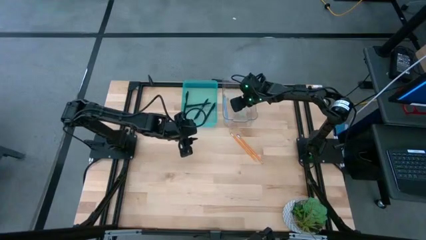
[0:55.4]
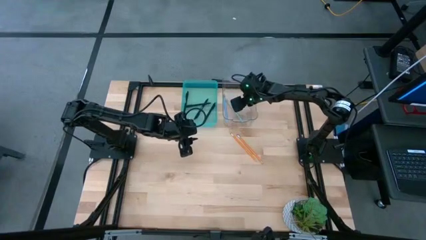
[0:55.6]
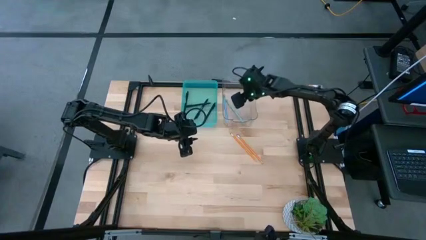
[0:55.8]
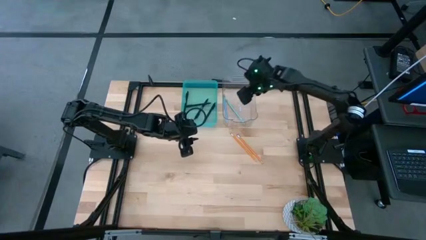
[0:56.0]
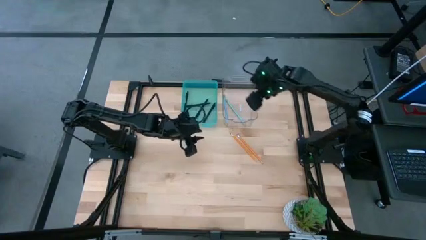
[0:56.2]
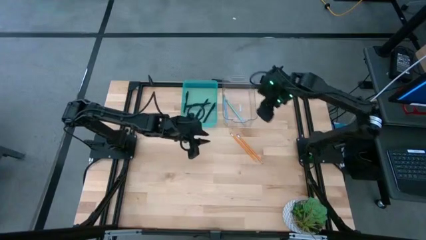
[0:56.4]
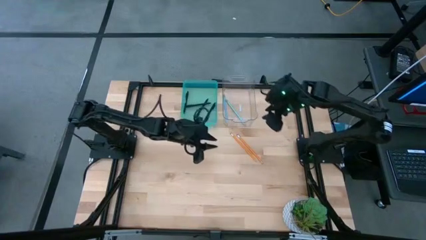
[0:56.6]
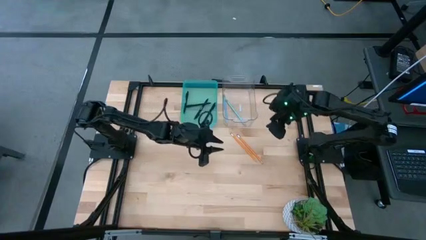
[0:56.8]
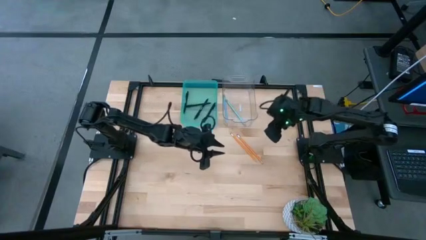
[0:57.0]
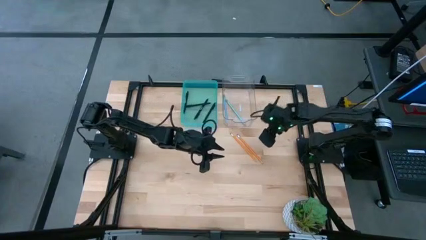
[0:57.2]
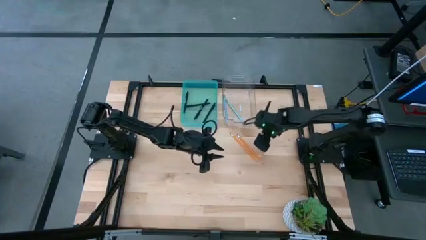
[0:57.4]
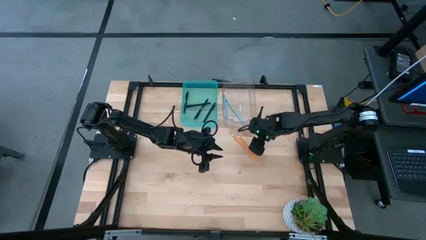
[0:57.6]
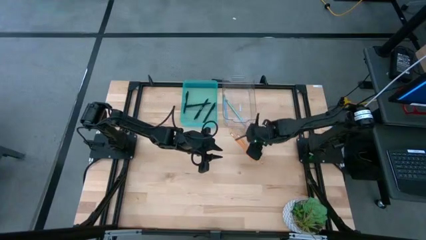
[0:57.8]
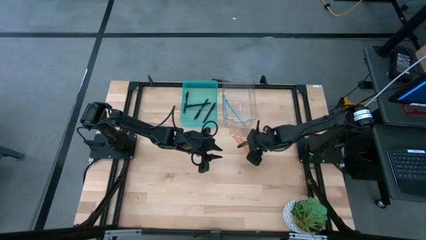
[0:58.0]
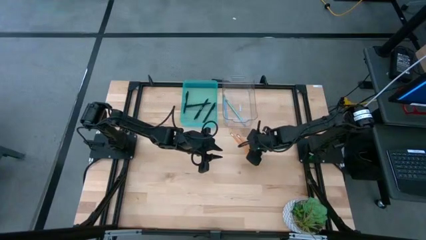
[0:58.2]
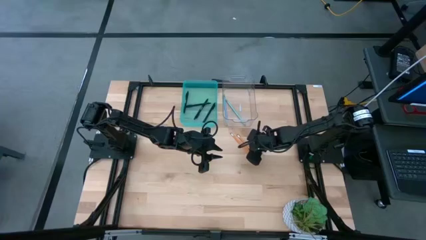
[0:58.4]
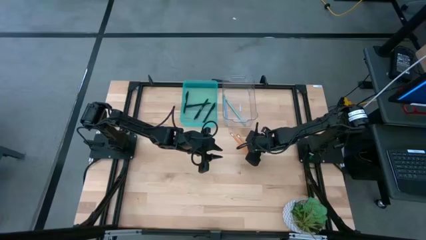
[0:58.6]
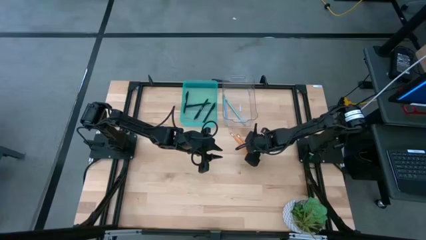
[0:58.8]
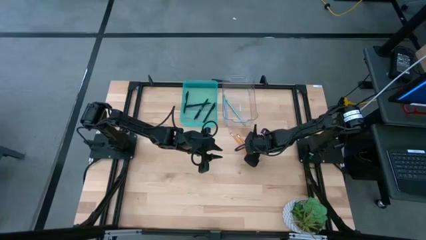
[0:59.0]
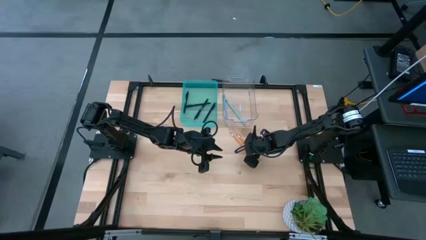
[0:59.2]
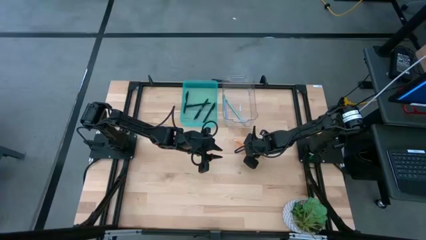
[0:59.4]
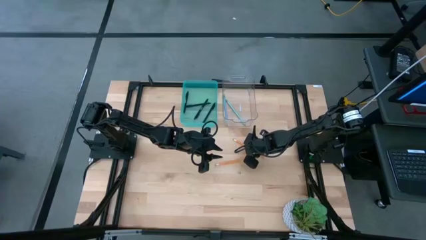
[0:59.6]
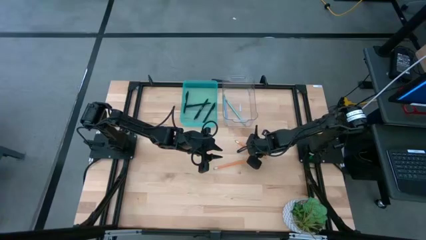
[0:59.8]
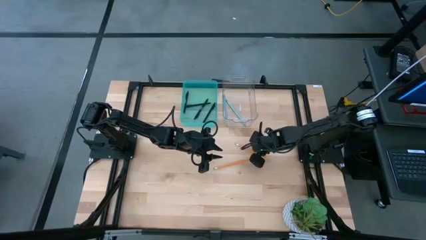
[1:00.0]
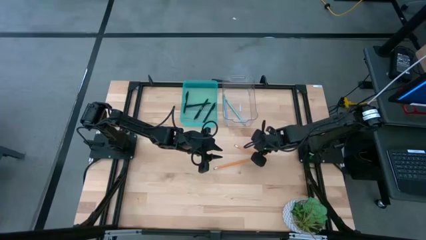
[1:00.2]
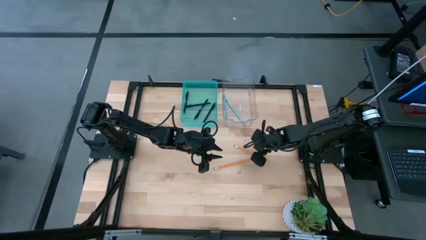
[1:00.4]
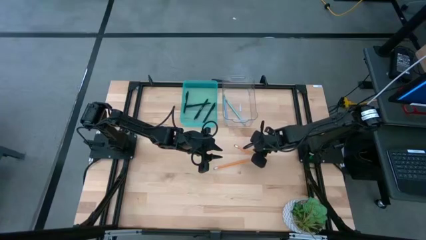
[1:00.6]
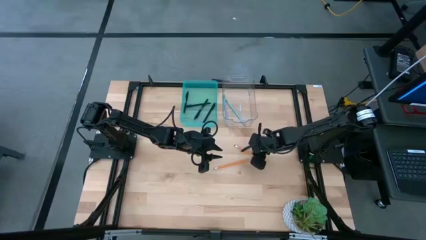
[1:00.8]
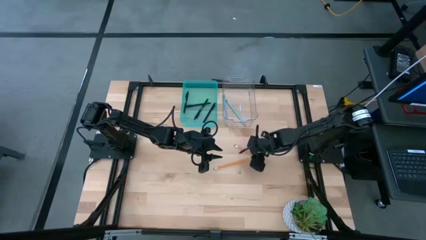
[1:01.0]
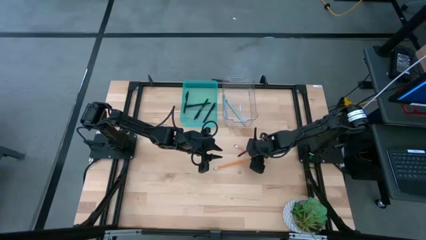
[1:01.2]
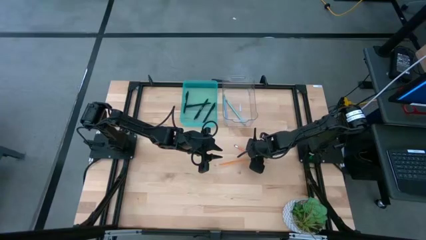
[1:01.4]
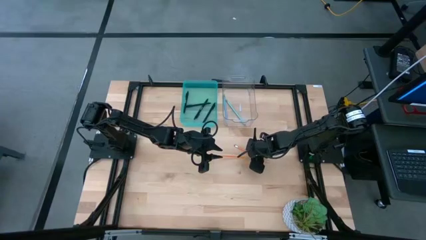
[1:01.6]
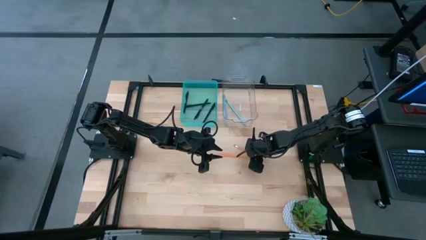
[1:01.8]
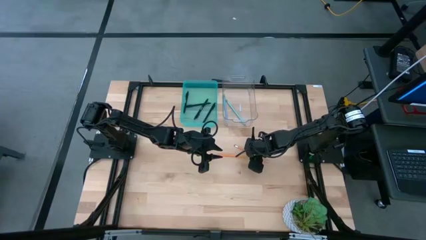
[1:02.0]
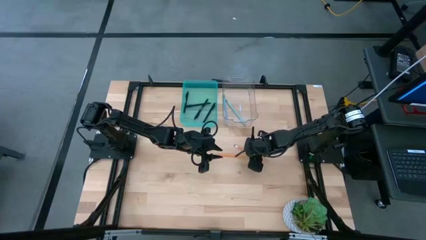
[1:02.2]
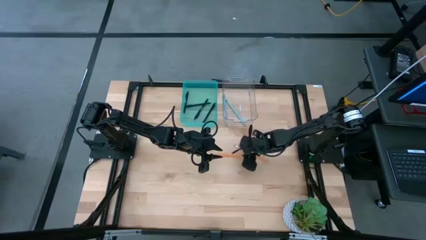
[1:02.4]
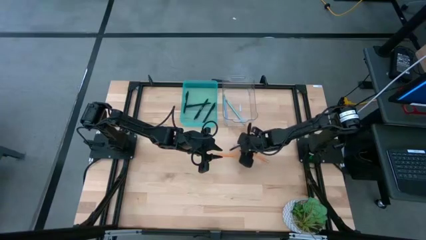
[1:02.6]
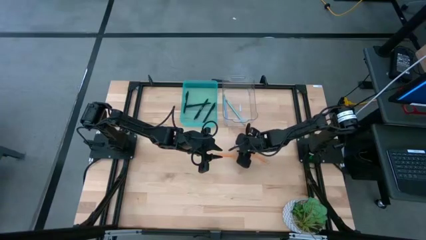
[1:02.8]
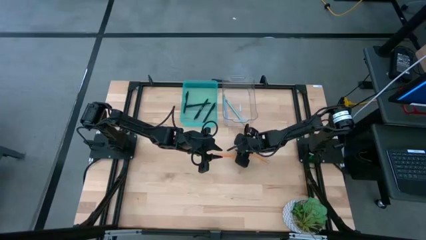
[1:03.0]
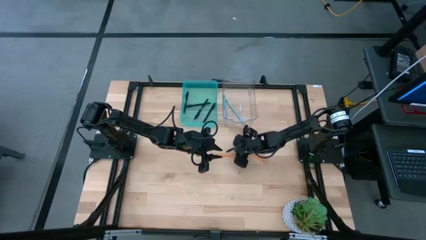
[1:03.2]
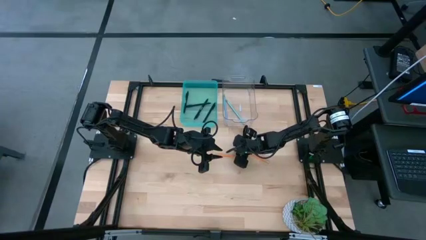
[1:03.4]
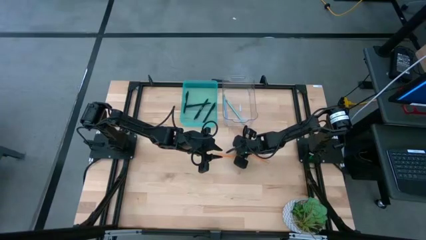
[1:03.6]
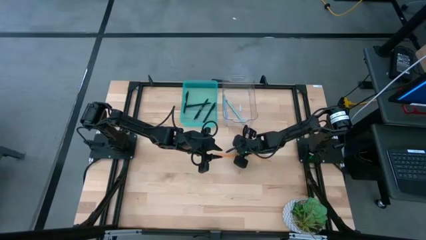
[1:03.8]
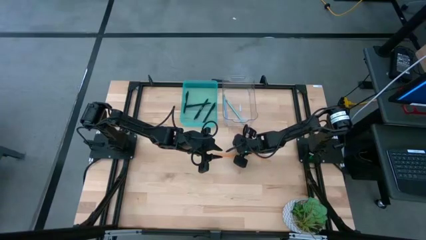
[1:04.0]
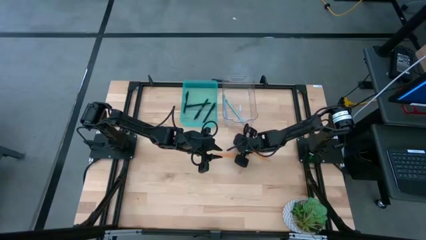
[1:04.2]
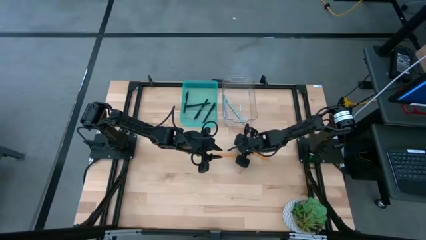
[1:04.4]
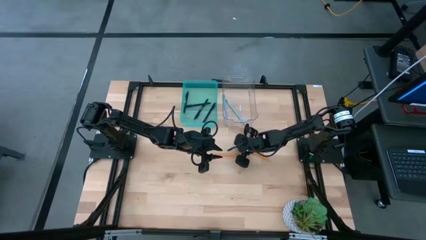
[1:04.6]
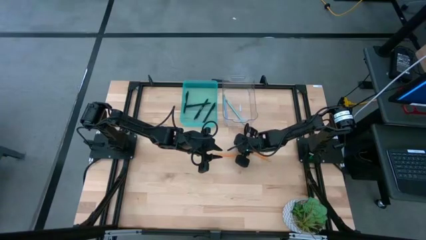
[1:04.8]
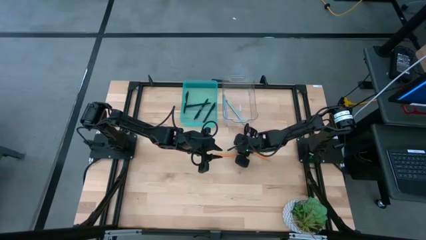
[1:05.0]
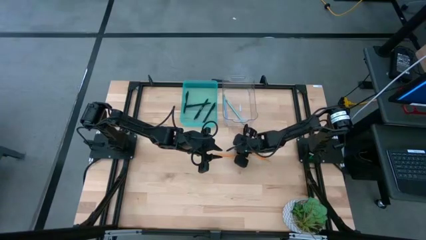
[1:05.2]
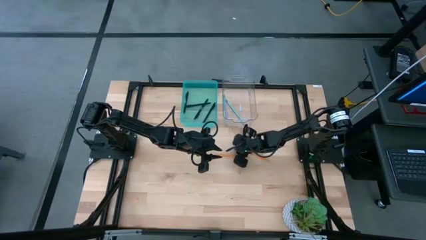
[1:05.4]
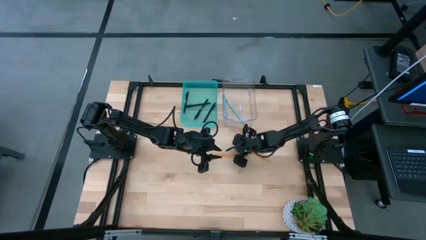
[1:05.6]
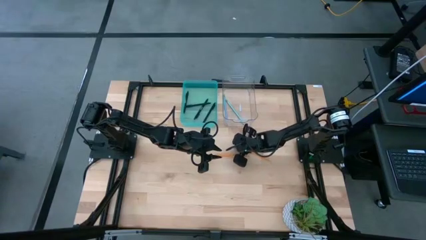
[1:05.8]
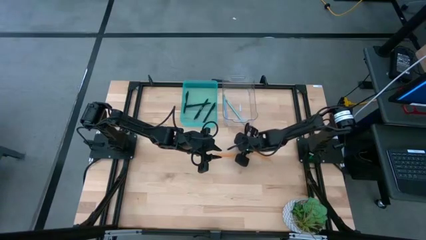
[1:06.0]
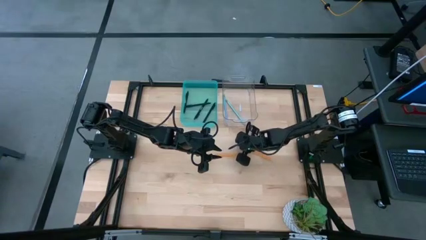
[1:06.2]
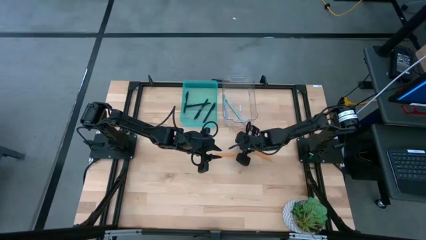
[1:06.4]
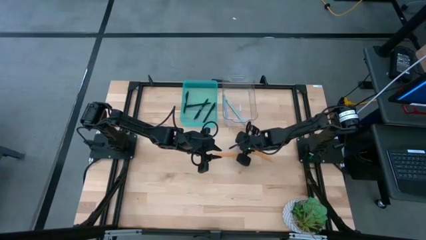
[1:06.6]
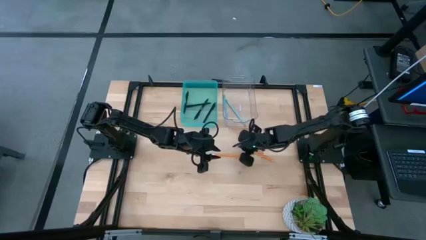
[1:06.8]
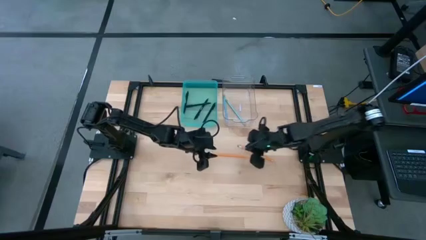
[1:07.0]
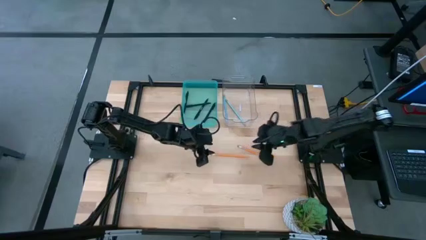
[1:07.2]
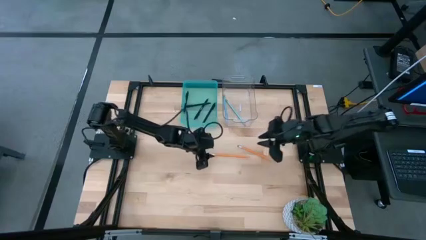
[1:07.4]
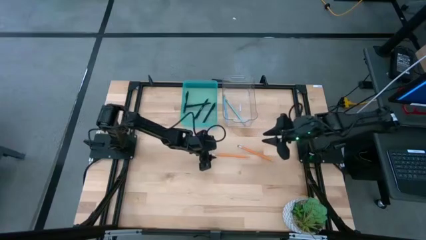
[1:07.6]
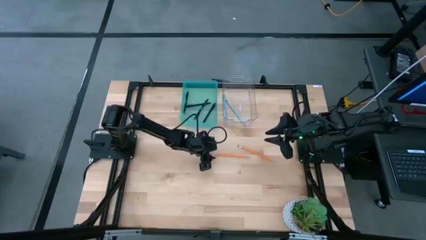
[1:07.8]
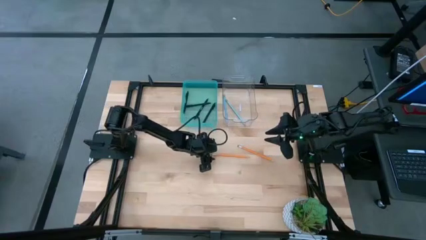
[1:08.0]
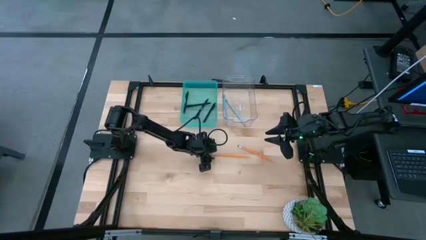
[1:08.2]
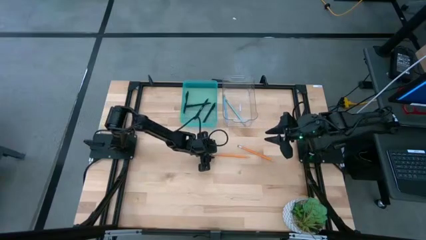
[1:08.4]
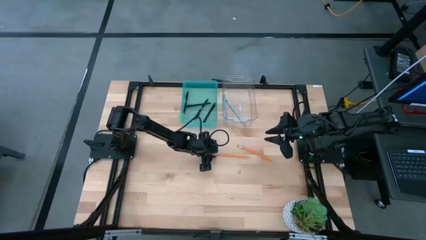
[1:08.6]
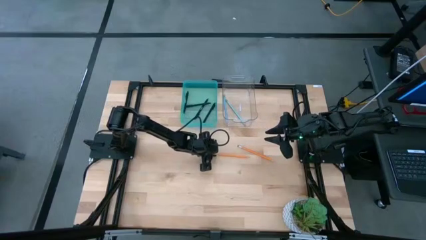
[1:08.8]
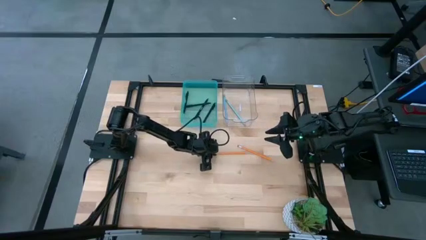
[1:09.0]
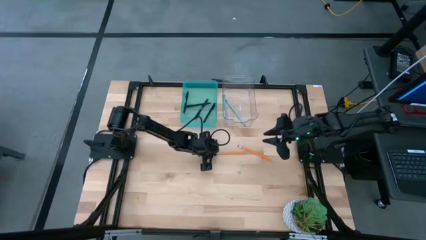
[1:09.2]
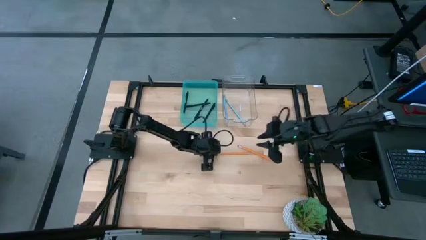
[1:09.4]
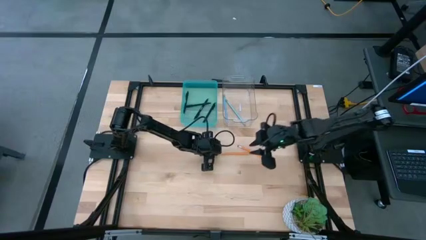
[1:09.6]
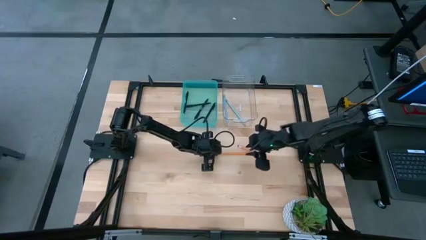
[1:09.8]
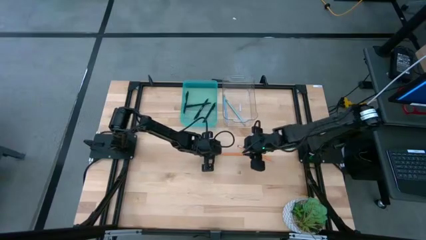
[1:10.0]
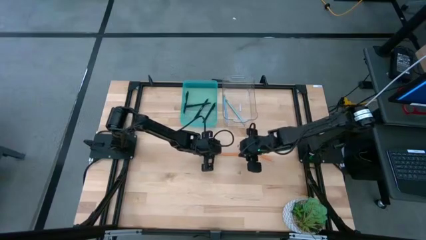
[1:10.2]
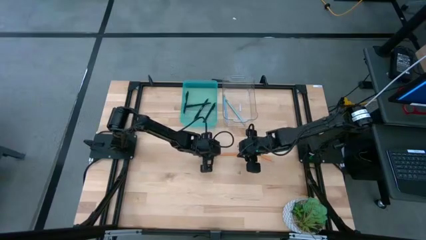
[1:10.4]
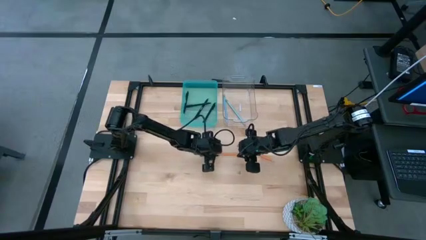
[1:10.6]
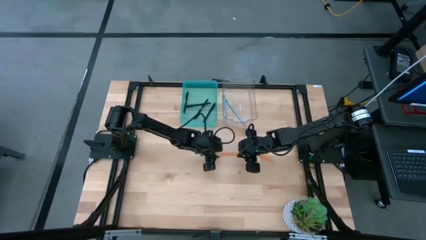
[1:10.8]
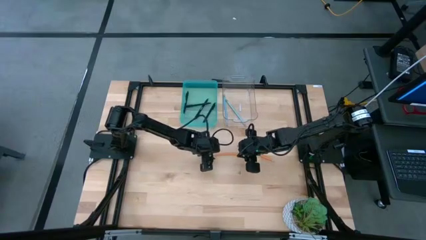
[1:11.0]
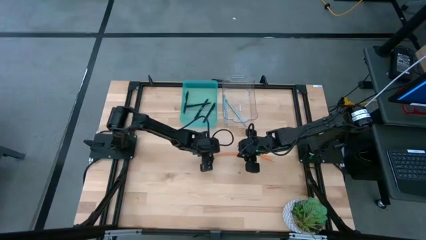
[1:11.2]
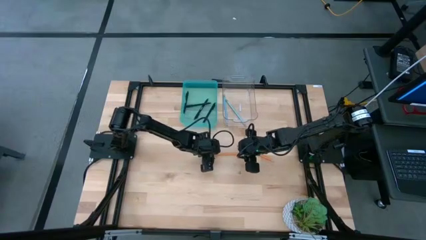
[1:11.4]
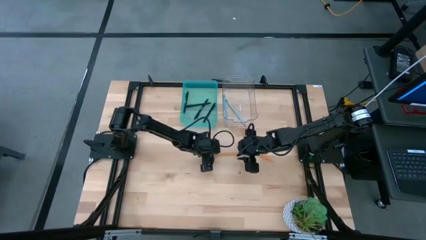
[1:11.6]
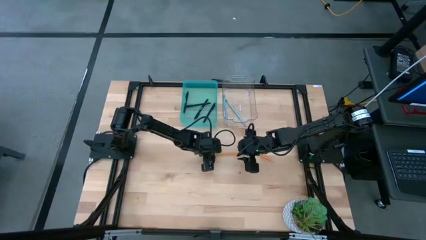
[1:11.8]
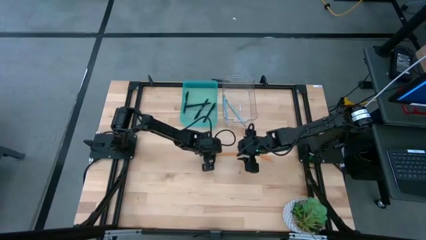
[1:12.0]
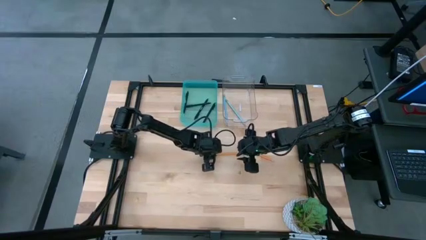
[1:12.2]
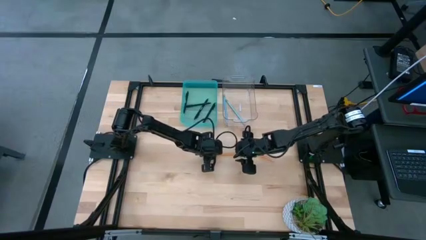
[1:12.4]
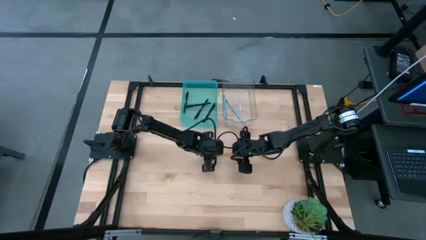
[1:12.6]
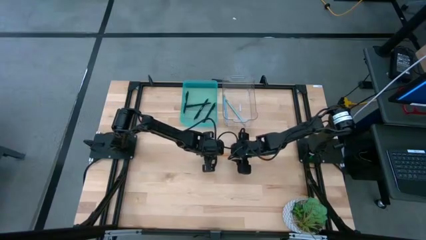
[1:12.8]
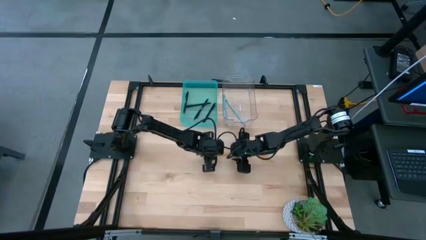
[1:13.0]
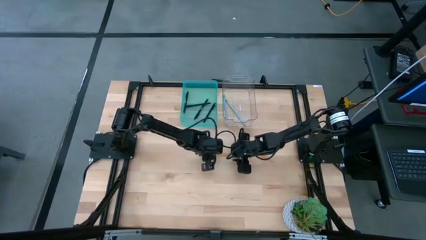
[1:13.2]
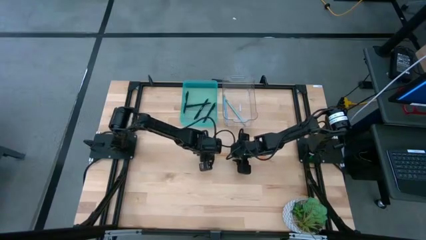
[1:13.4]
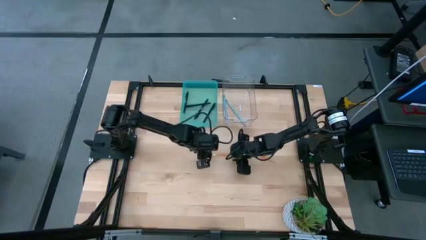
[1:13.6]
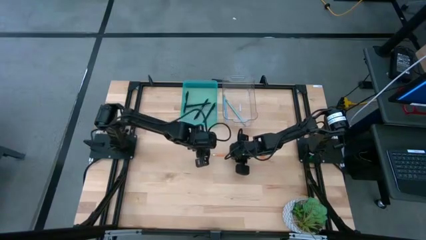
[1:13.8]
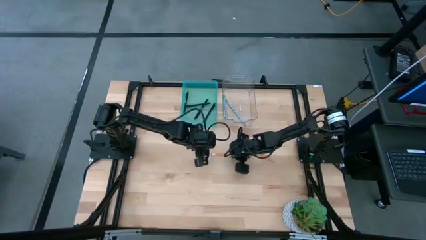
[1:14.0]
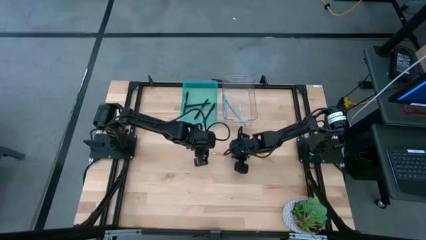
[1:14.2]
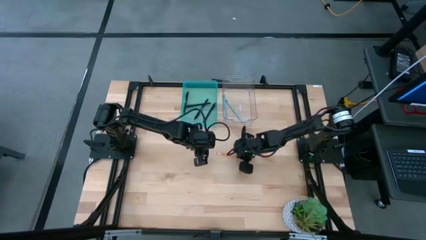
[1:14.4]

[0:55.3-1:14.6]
Task: Sort pens & pencils
Put the bottom yellow pencil into the transparent bin
